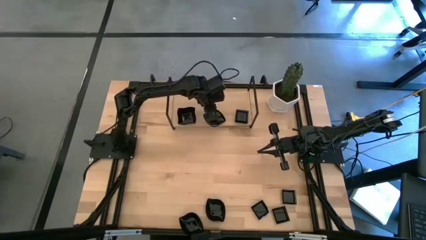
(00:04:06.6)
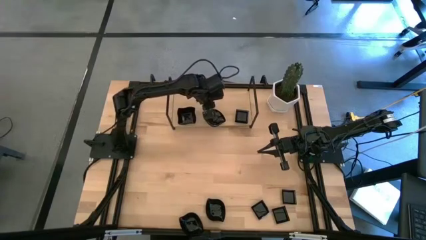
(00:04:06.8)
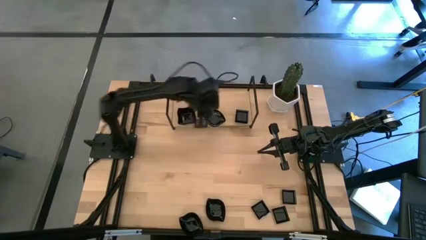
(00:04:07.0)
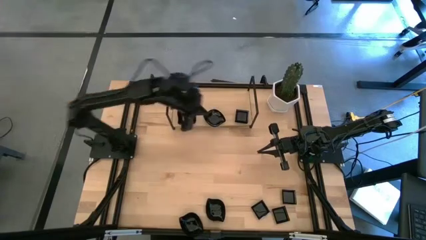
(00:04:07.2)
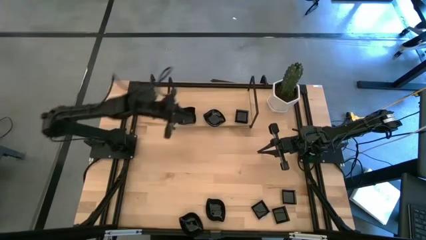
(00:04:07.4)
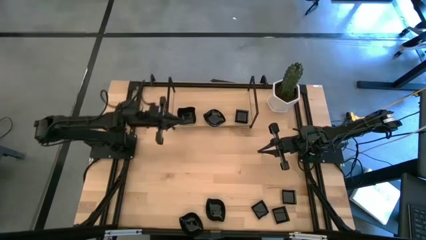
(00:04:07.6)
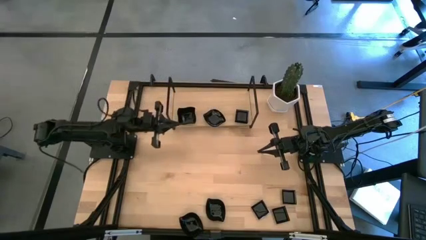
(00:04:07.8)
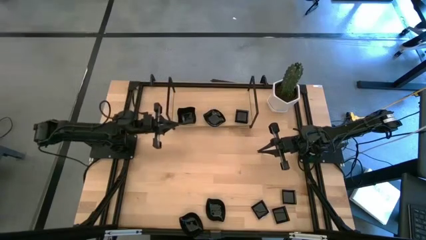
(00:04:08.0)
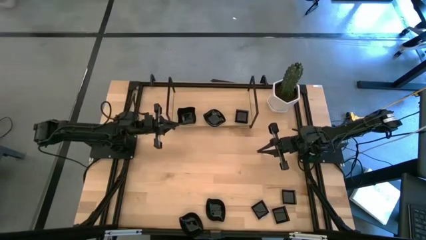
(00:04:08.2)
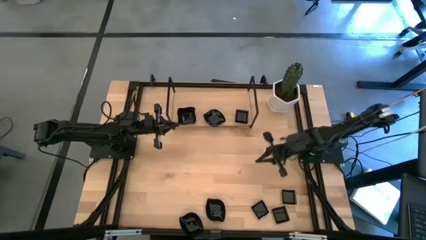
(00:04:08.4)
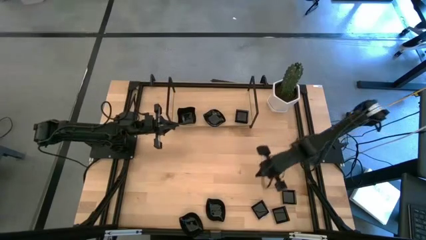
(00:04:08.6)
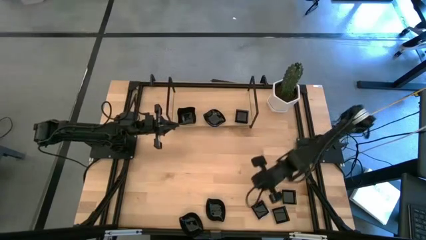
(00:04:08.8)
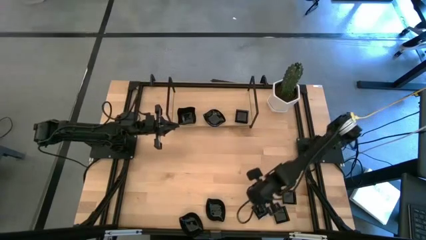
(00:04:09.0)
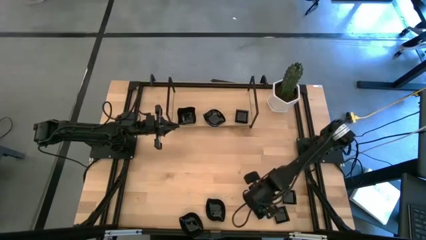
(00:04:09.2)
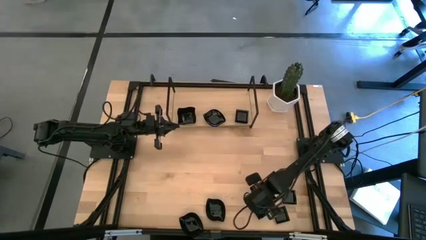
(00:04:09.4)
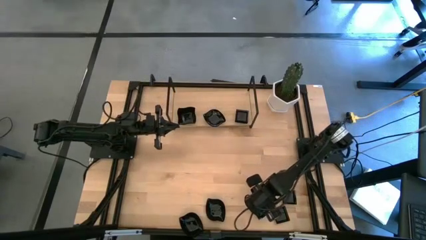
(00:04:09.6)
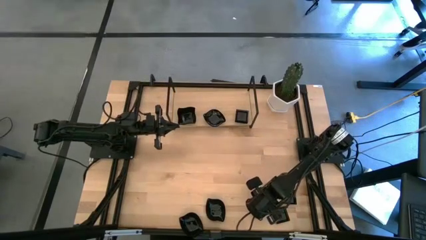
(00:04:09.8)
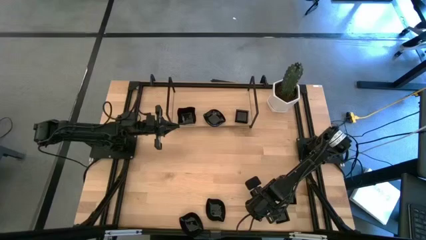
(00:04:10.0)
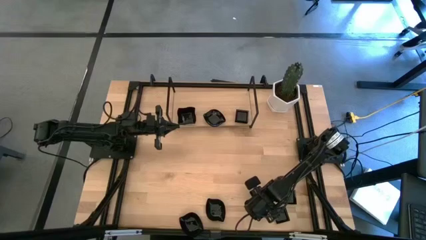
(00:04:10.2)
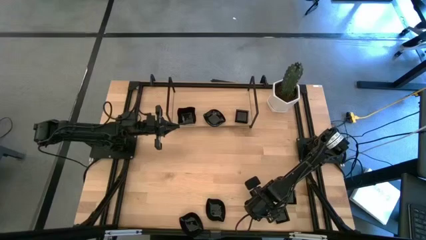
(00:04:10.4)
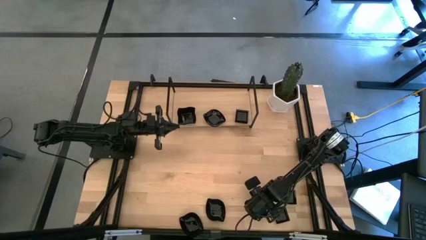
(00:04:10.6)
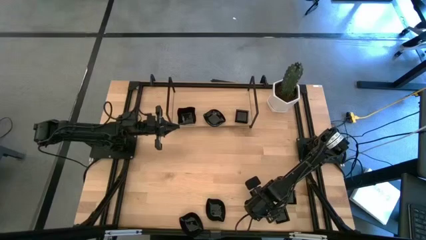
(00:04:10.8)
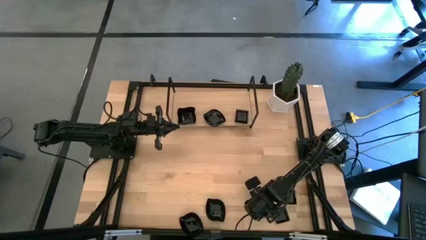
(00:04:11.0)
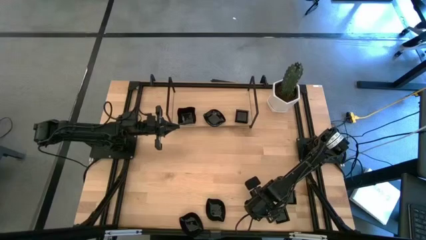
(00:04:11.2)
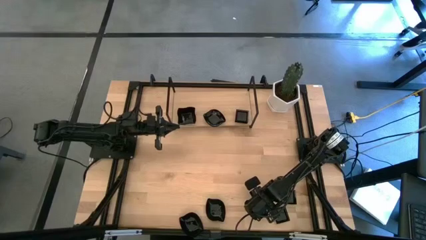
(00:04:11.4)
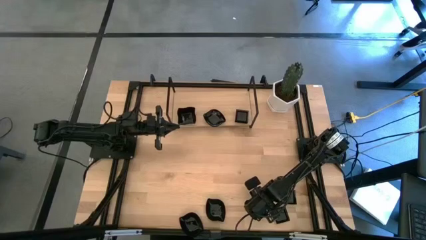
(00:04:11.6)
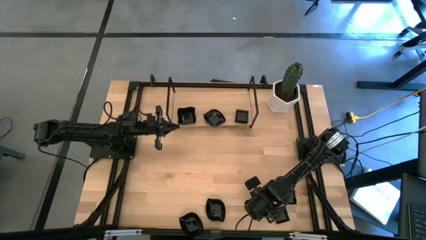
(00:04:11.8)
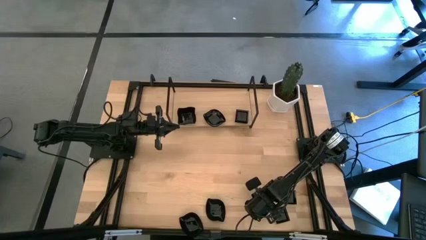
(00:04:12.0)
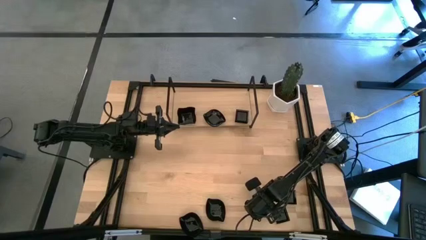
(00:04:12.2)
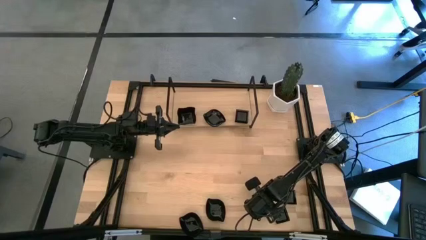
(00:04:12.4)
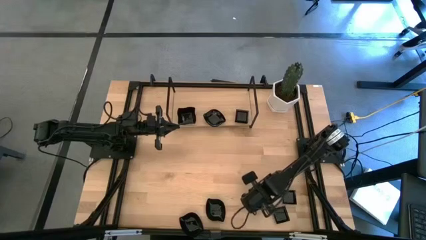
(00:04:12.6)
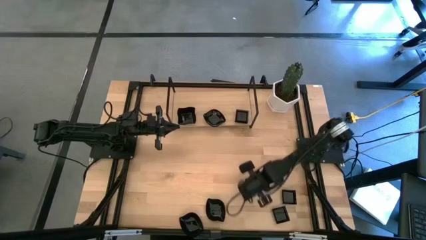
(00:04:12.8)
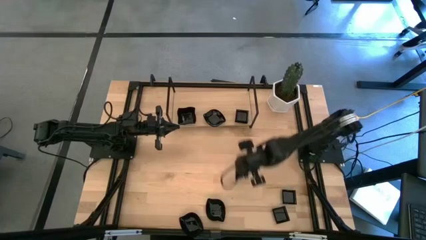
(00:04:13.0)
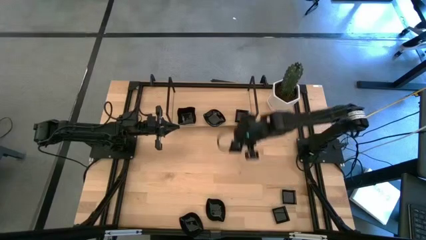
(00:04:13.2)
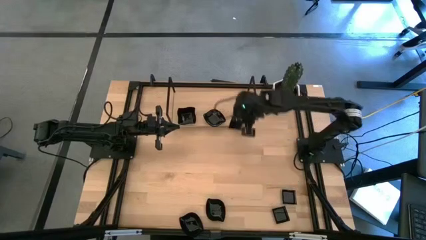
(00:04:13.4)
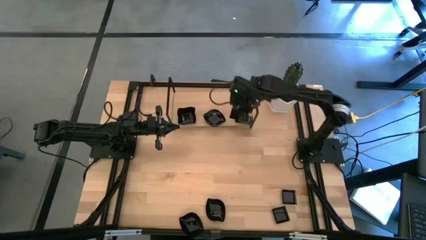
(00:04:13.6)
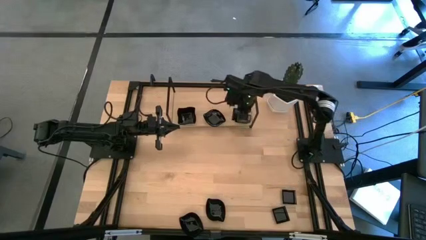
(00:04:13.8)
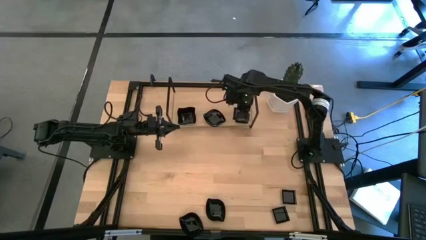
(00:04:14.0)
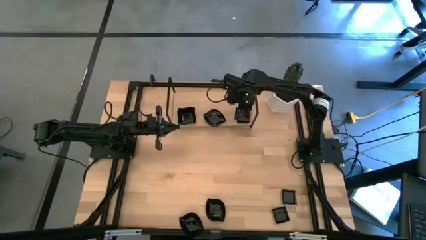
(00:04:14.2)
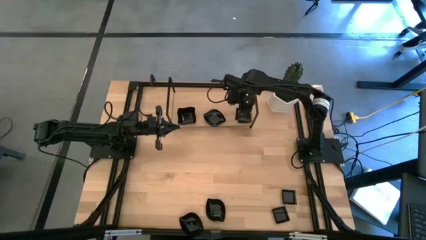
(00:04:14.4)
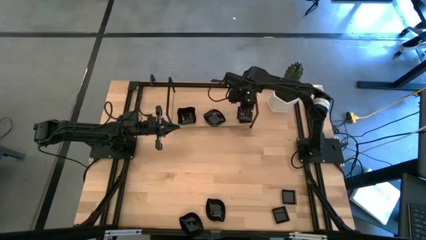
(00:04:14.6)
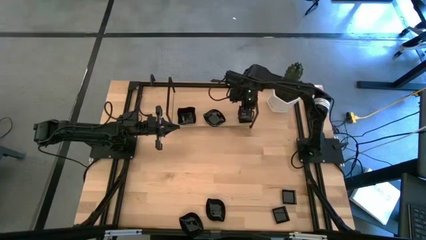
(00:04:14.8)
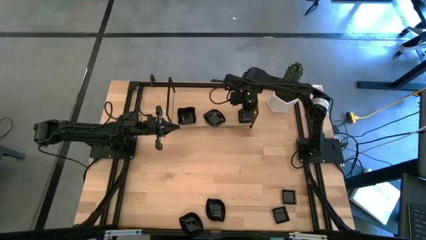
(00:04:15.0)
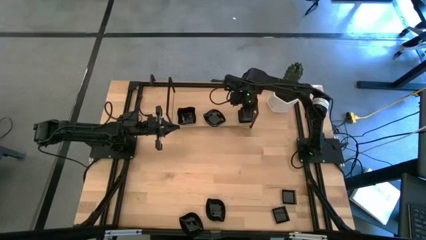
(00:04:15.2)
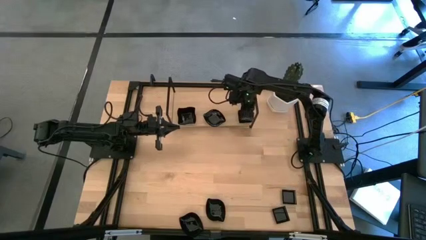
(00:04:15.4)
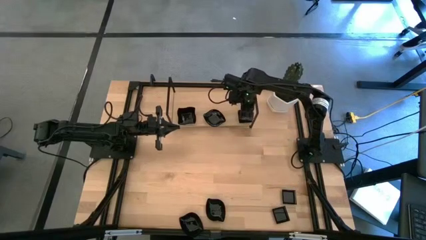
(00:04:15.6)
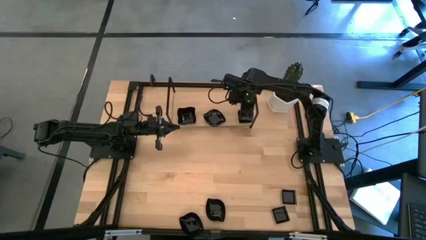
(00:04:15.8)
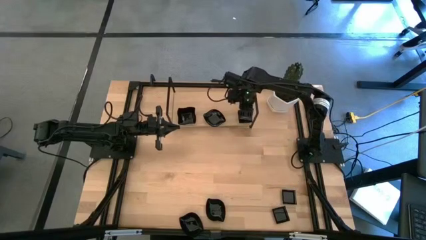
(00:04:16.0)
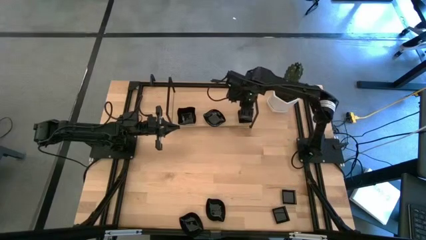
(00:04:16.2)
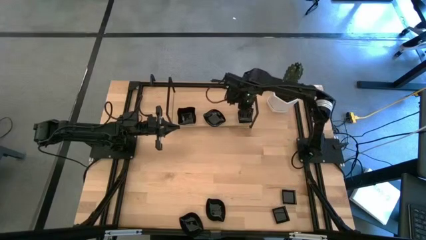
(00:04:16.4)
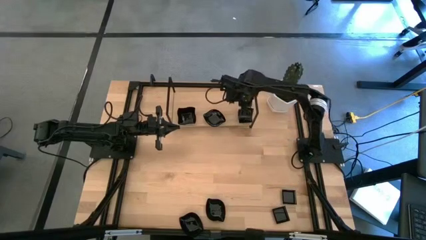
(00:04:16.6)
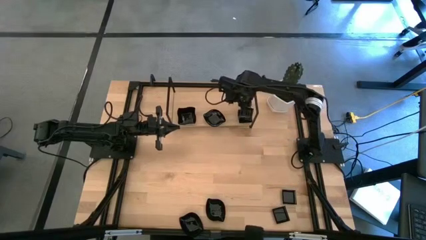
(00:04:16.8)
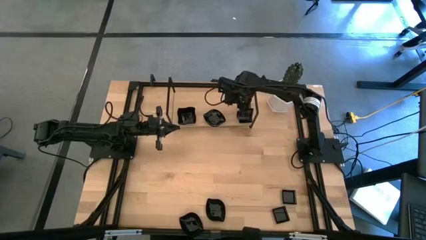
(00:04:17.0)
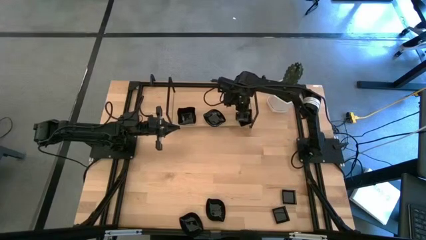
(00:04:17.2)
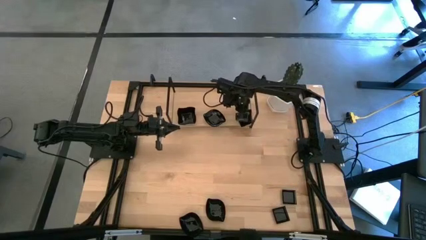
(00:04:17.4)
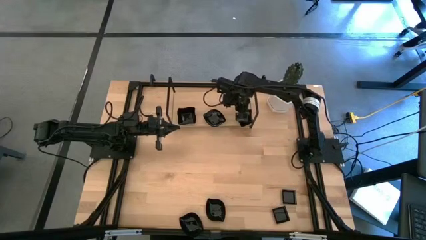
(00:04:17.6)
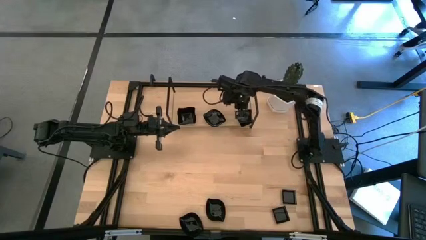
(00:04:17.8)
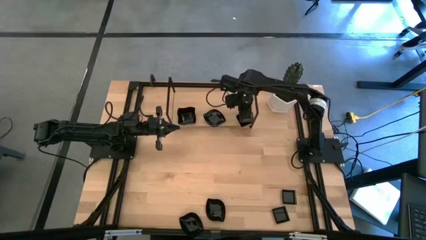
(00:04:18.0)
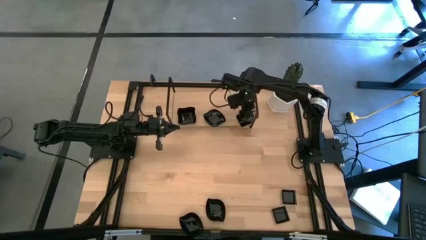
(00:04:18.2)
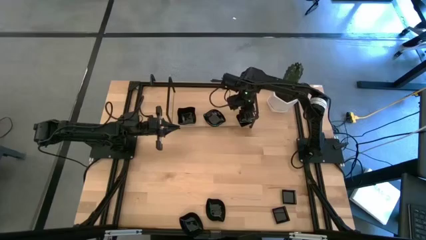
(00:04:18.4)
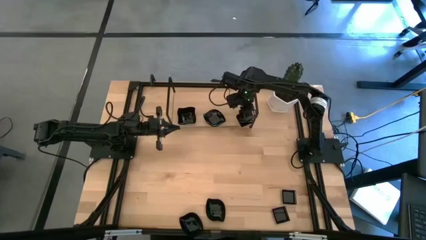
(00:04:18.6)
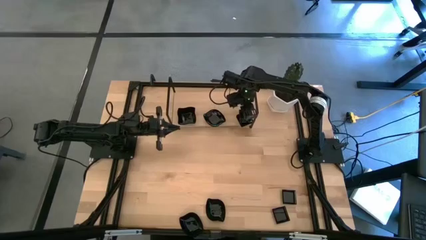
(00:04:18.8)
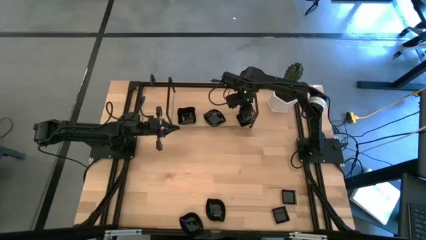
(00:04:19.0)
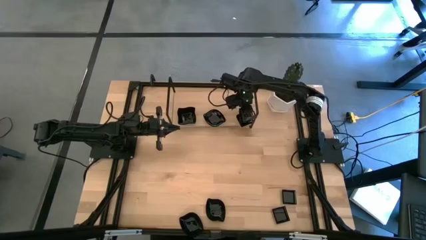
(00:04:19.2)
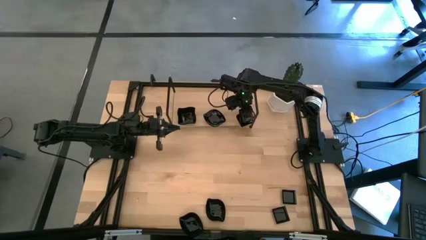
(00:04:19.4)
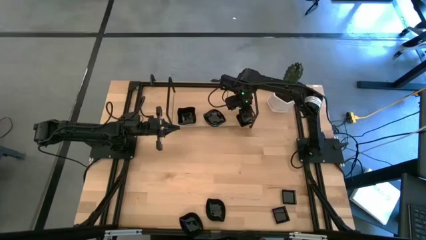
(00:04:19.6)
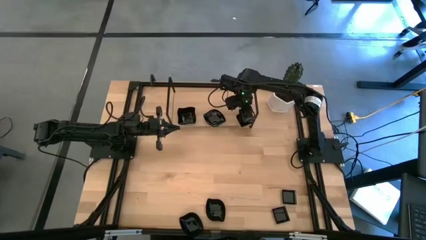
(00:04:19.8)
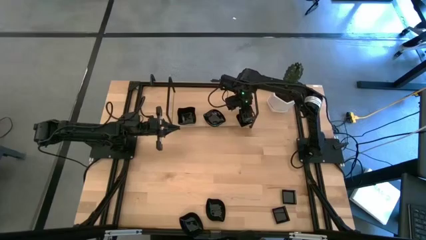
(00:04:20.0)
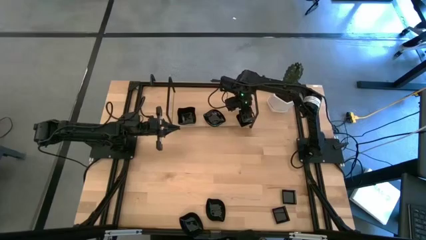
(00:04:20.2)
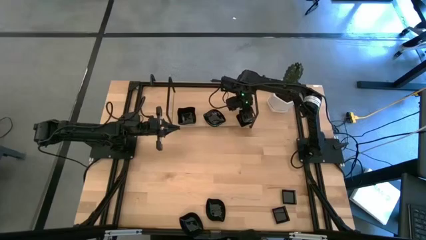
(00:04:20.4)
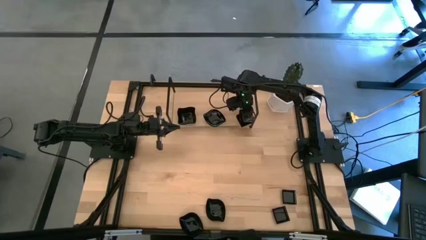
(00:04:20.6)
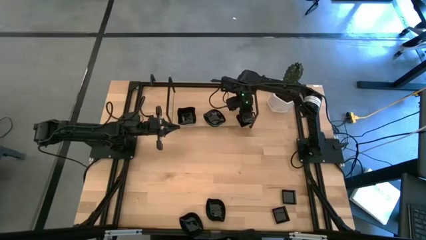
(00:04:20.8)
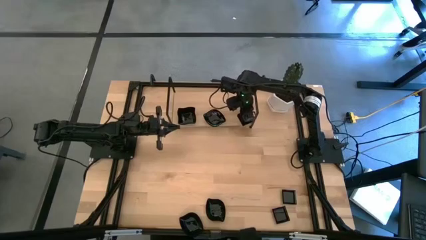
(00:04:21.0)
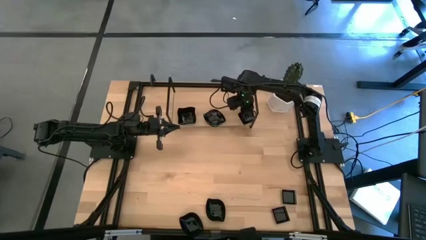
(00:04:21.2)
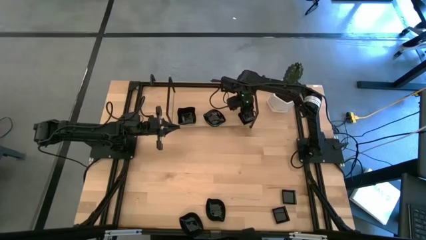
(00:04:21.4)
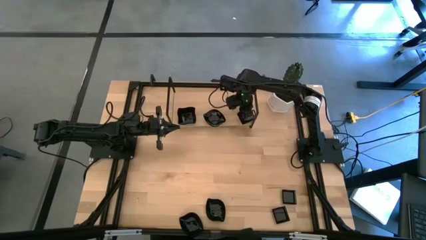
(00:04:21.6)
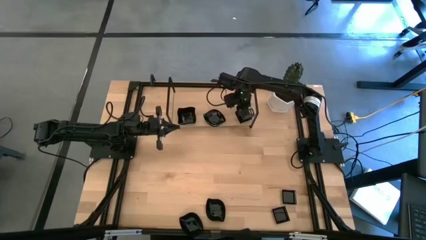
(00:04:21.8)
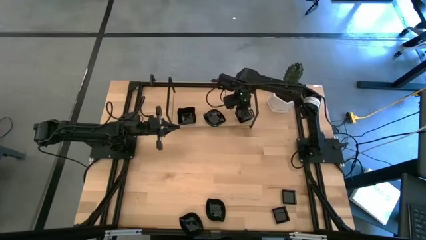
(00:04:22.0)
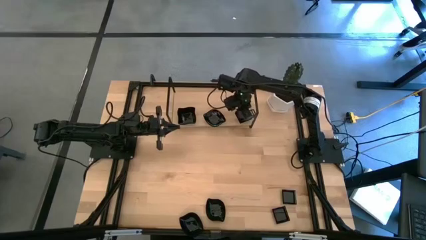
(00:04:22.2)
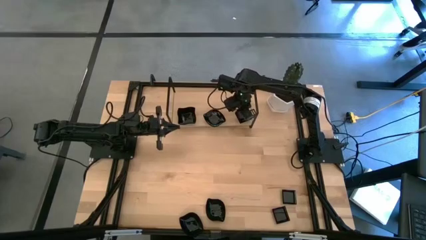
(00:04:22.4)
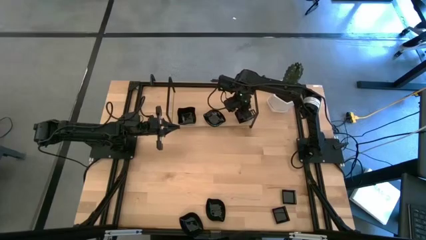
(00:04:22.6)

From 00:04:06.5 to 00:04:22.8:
Task: Pick & Place Mini shaped plates
Stack the black square plate on top of the black square plate on the shelf
